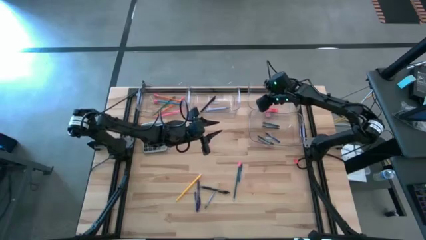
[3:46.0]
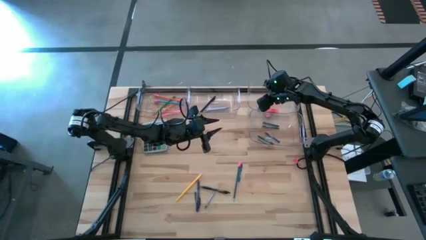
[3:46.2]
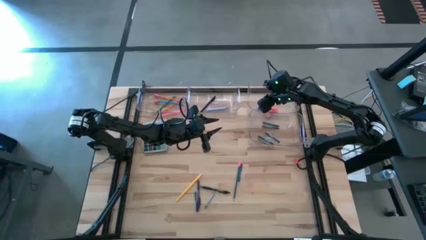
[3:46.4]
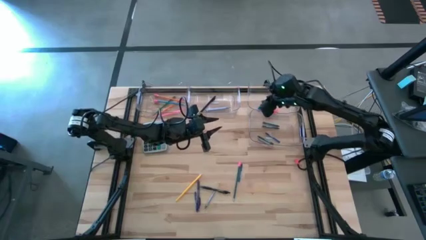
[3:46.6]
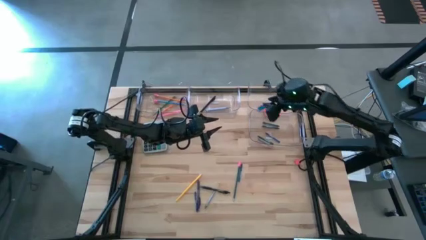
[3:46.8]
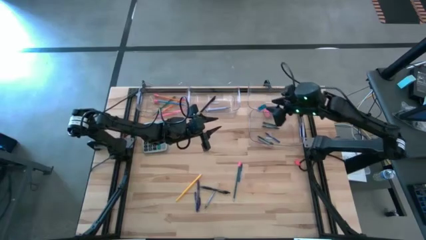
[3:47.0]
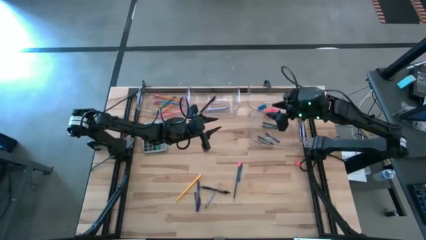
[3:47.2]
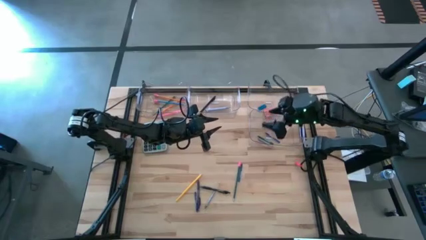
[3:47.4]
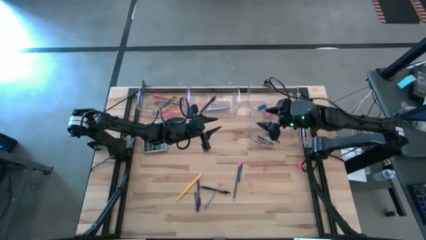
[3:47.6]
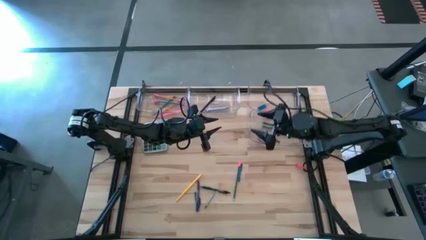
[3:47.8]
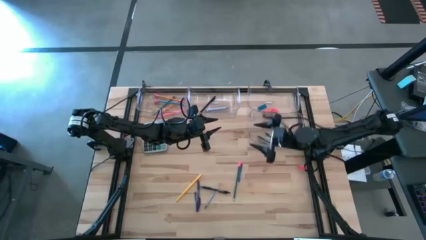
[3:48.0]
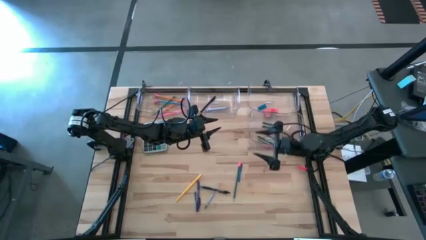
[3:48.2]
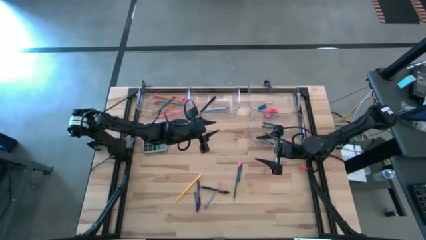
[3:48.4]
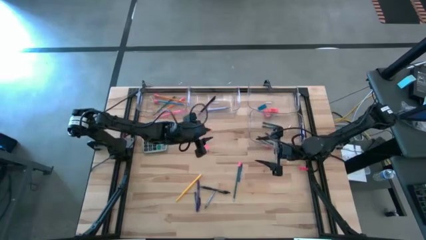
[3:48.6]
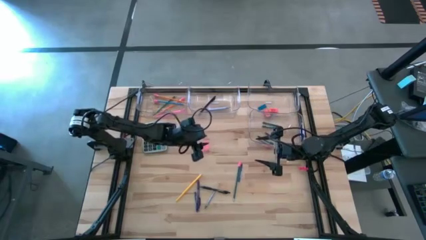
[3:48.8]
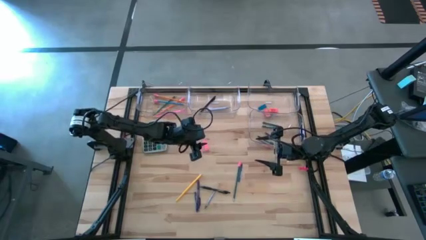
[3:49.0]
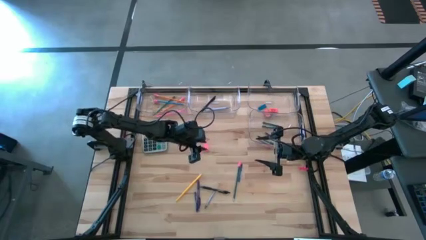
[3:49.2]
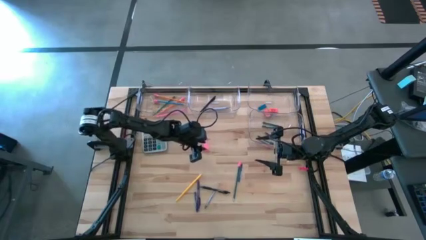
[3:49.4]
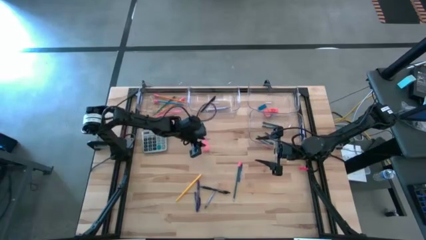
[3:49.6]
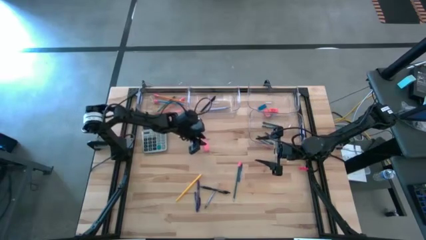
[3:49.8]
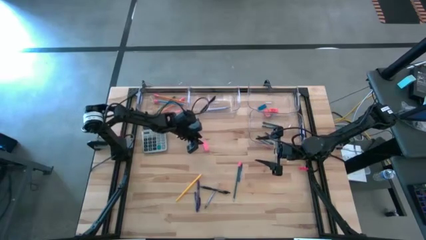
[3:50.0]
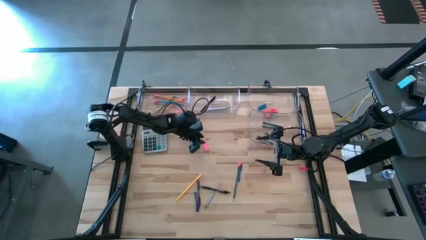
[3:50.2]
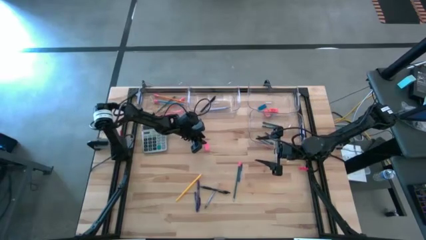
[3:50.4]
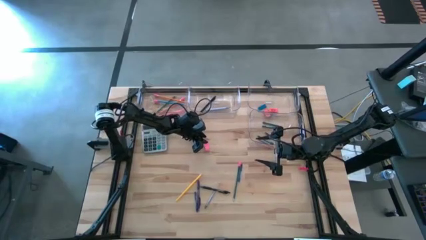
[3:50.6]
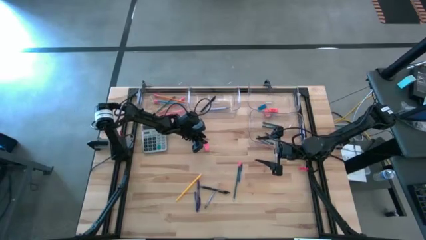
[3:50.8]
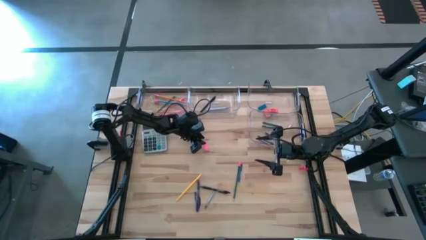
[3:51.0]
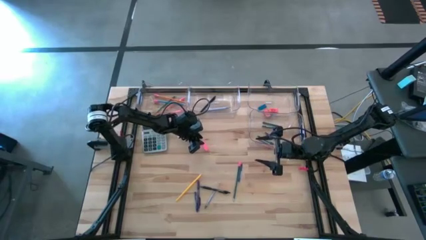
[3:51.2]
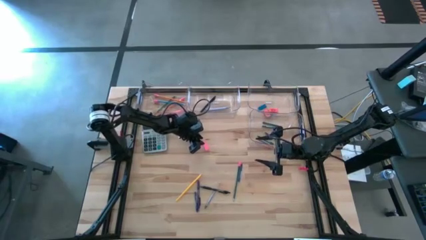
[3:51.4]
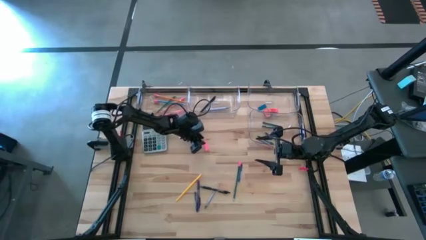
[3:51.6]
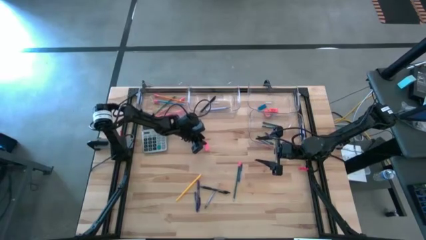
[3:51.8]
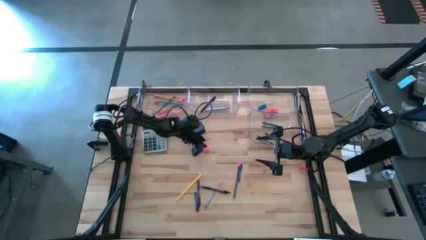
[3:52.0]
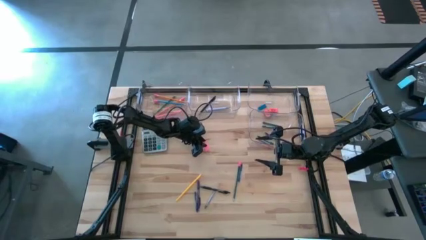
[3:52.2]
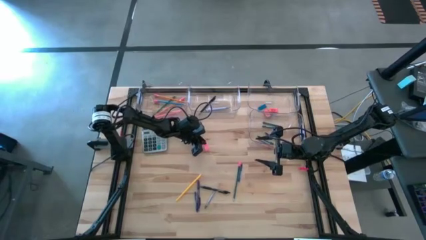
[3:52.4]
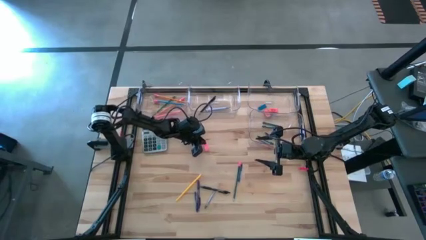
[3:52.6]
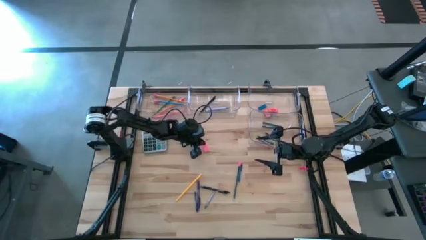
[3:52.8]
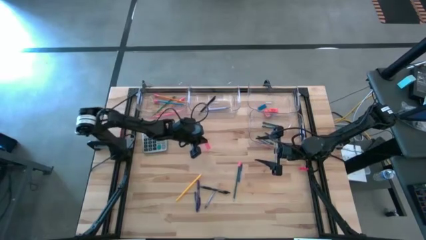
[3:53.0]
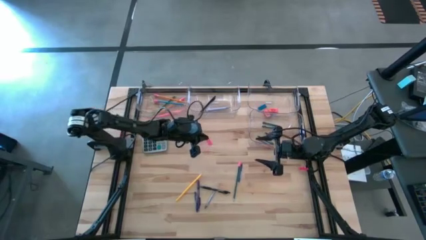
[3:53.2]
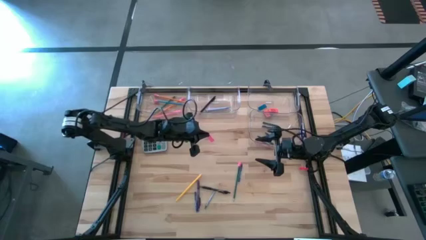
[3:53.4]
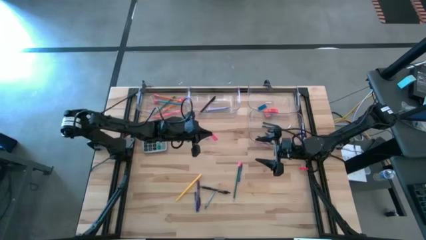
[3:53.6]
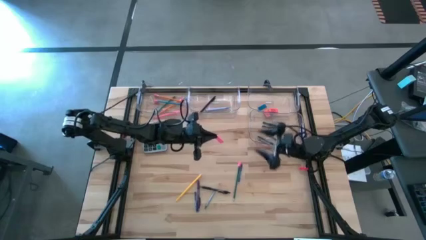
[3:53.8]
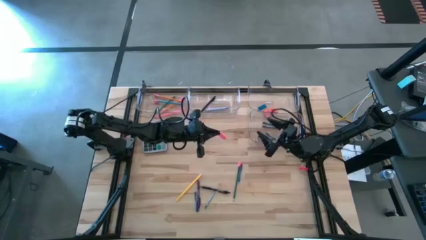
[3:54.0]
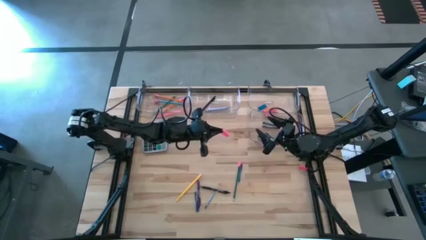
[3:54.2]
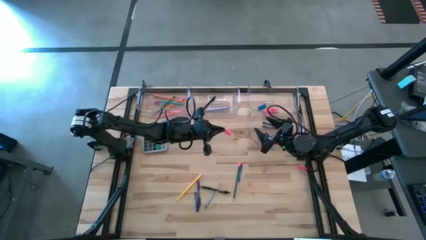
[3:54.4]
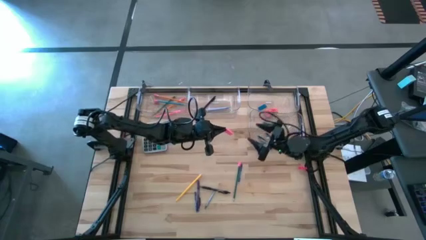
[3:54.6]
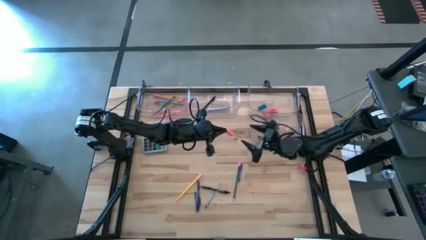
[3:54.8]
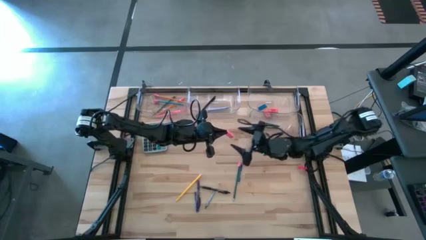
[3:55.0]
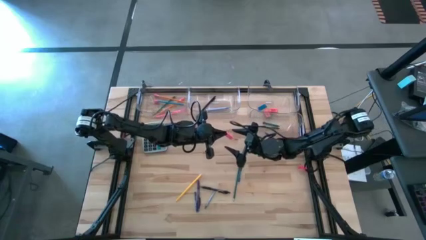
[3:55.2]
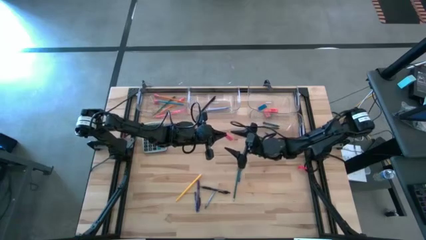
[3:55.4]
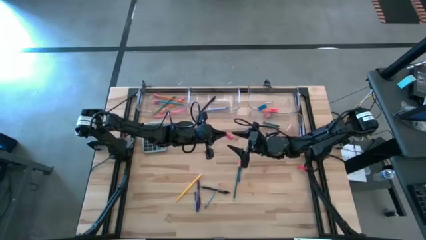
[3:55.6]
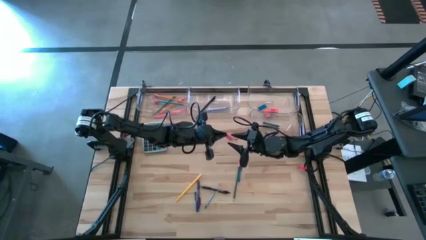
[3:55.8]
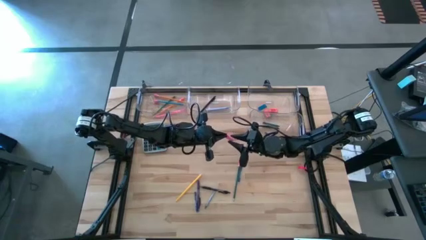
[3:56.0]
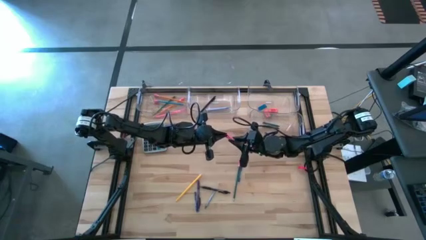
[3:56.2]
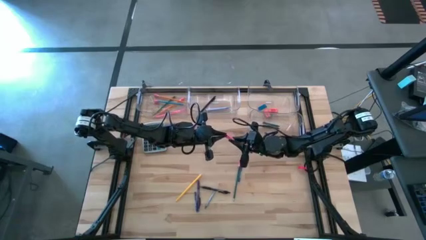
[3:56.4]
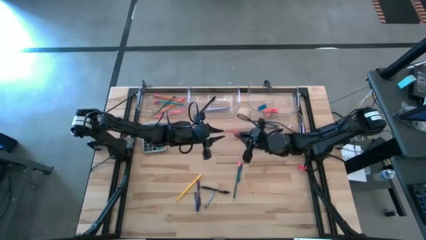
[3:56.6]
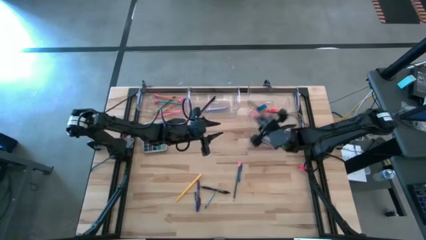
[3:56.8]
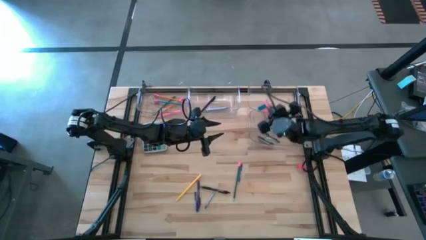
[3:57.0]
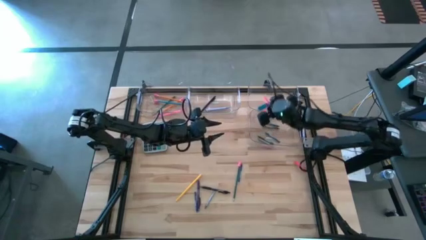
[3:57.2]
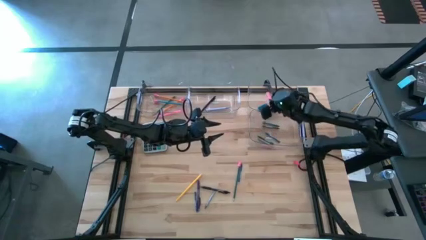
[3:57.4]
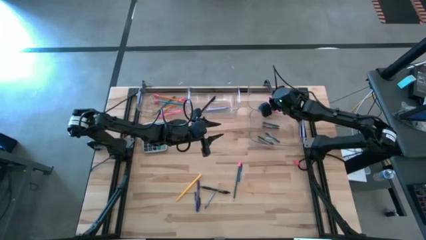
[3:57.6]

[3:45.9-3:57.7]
Task: Sort crayons/erasers/pens/pencils in bins
Put the pink eraser into the top right transparent bin

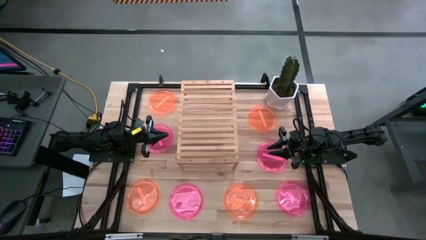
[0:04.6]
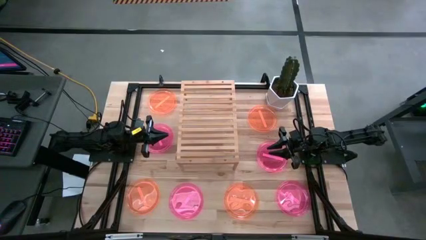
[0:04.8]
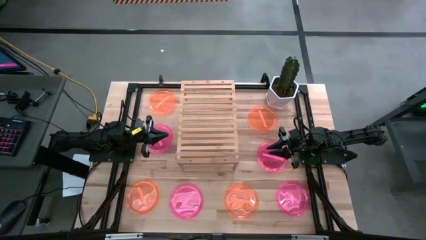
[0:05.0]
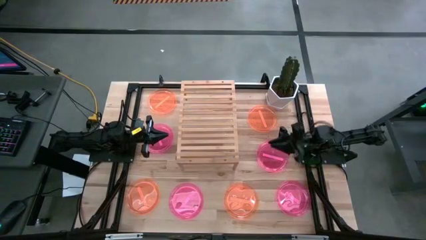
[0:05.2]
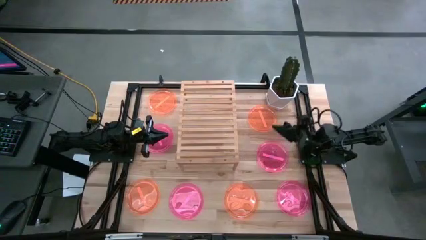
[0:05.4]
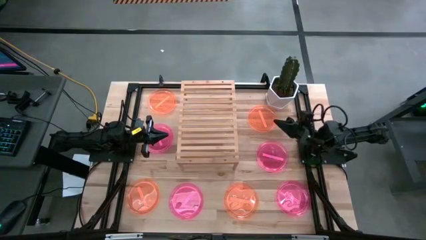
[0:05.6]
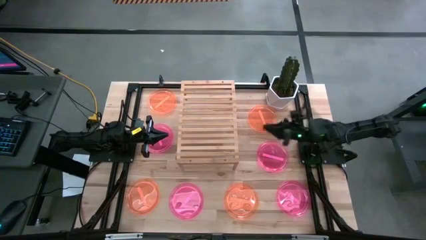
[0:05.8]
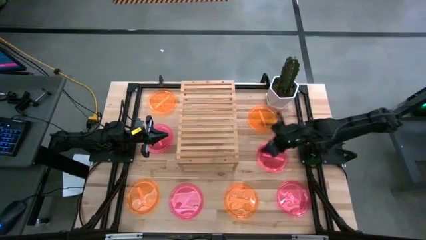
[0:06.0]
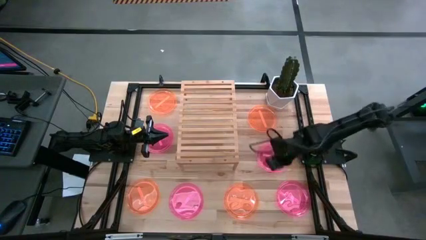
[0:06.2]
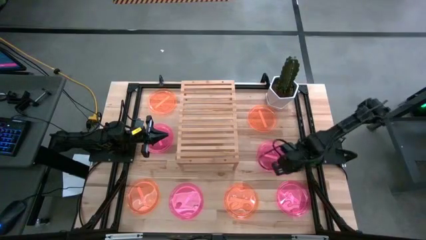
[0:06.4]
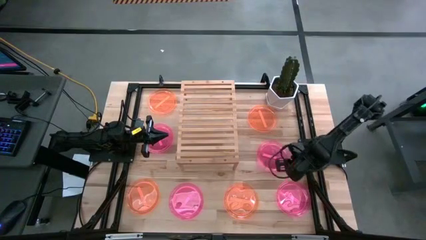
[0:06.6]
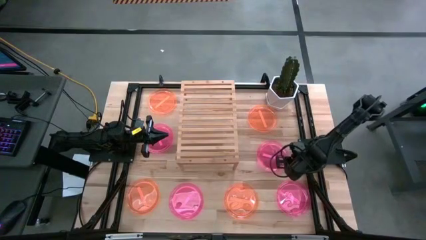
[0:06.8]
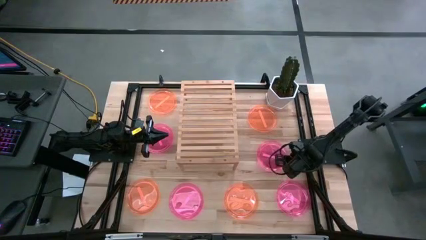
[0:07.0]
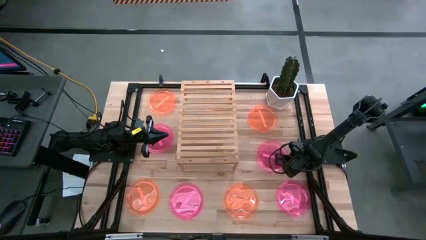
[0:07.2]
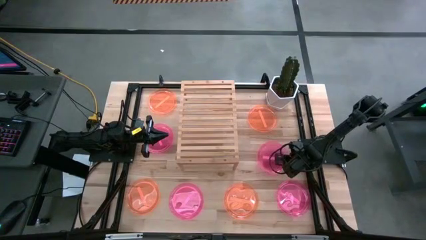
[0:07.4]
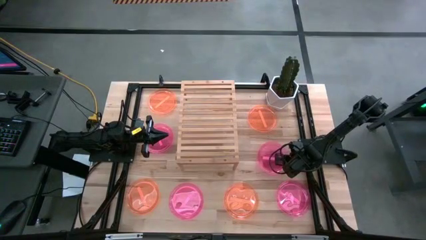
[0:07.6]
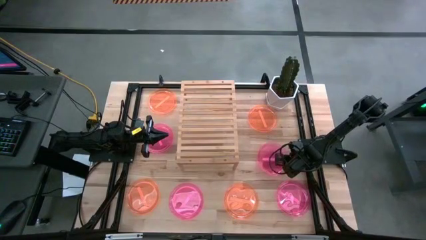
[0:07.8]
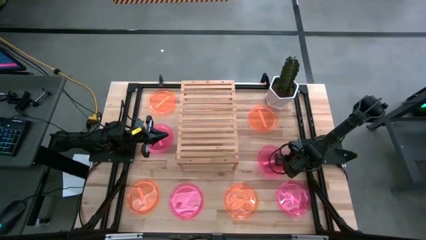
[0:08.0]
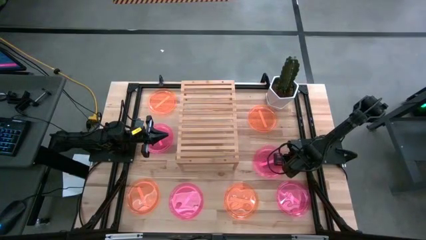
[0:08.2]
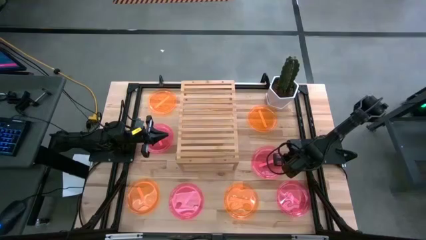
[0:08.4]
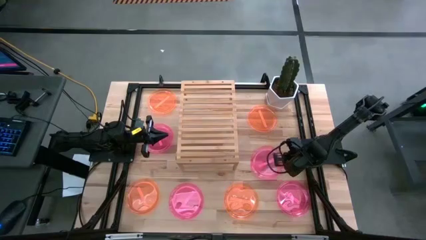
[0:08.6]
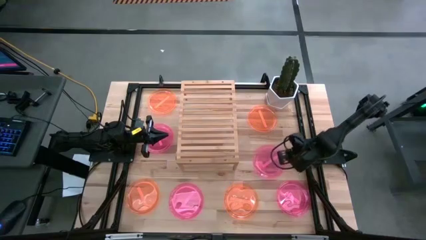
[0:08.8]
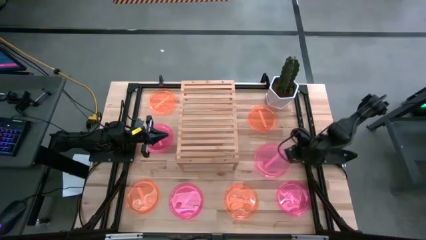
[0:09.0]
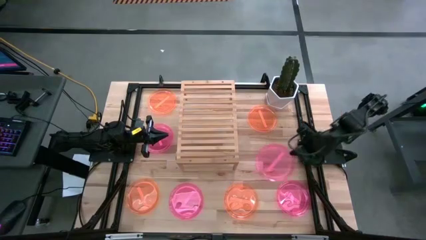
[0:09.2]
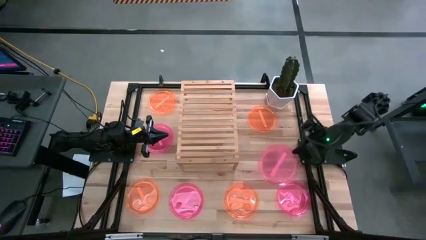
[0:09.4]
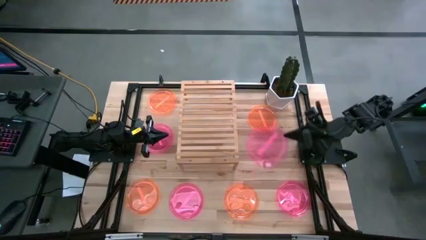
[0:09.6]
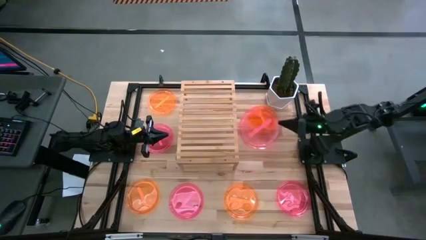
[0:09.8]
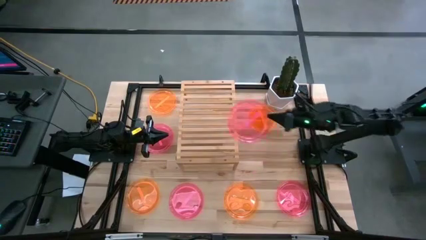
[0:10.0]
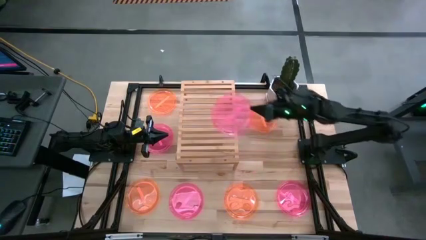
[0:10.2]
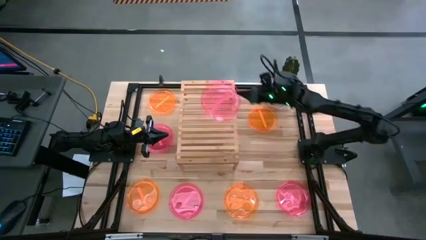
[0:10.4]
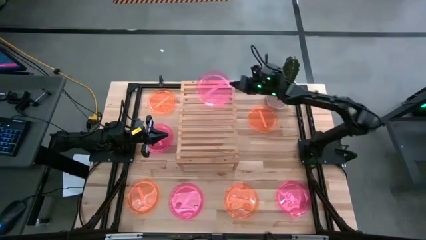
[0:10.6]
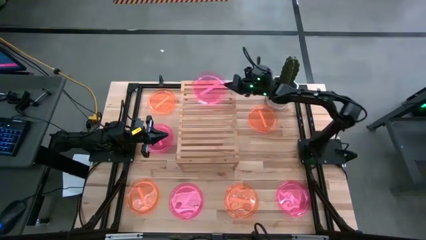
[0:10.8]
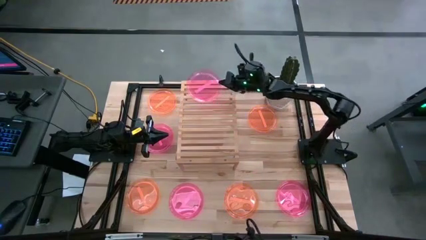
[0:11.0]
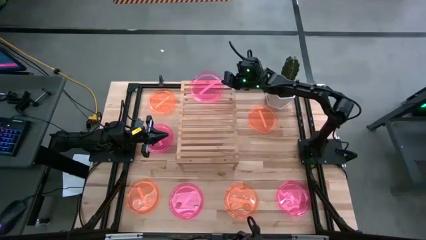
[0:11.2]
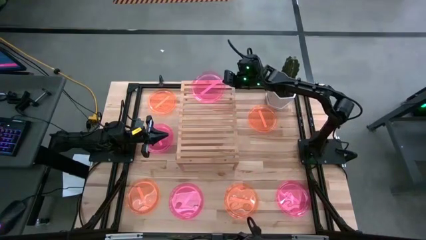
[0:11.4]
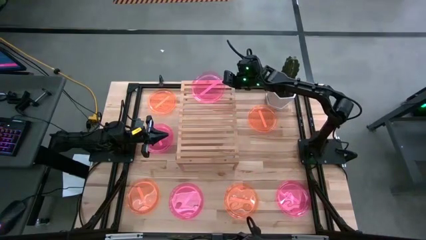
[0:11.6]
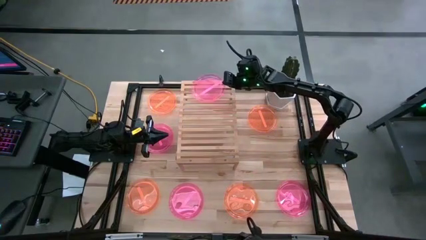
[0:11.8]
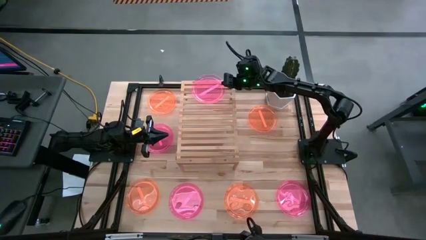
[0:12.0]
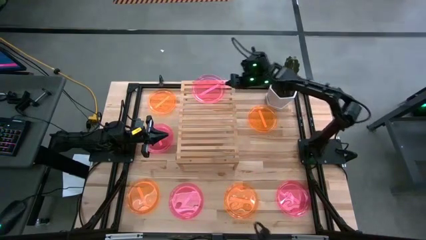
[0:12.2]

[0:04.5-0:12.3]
Task: Place and stack plates onto a shelf
Put the pink plate on the shelf
